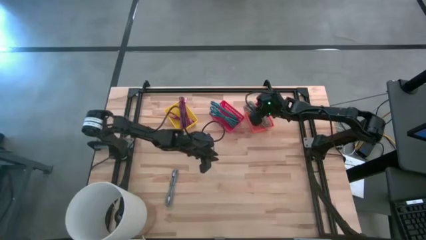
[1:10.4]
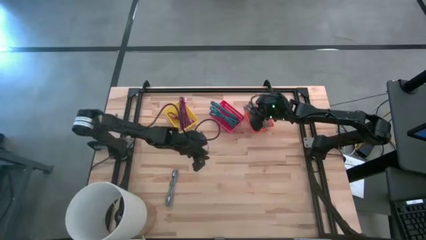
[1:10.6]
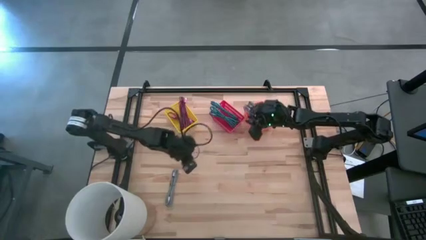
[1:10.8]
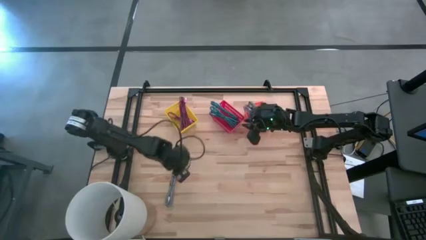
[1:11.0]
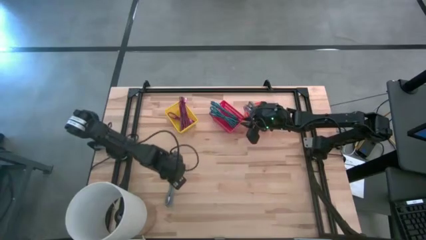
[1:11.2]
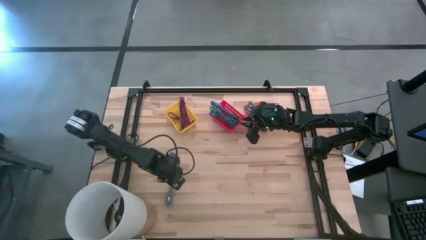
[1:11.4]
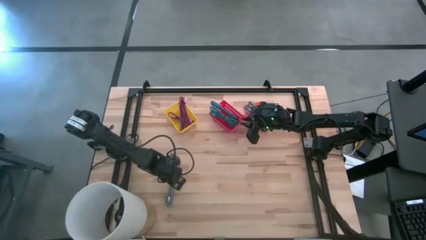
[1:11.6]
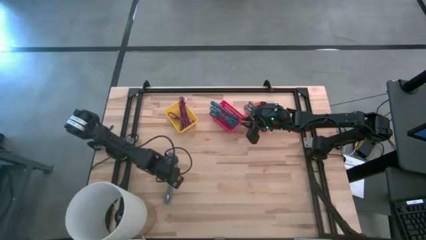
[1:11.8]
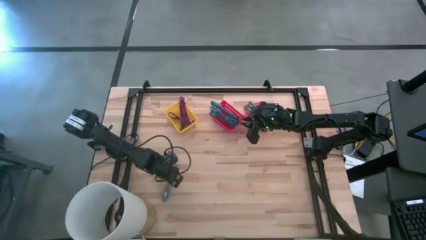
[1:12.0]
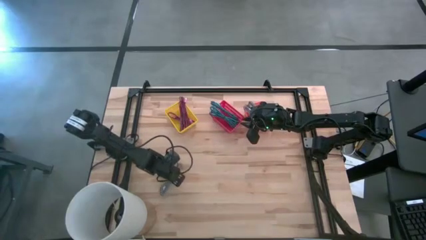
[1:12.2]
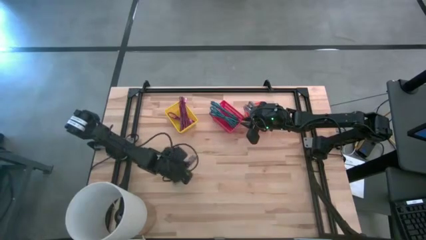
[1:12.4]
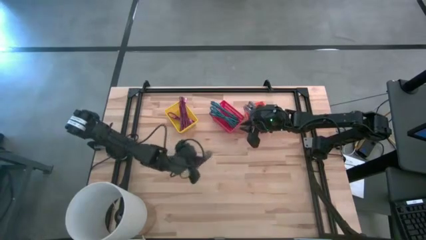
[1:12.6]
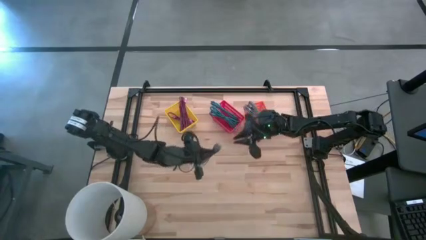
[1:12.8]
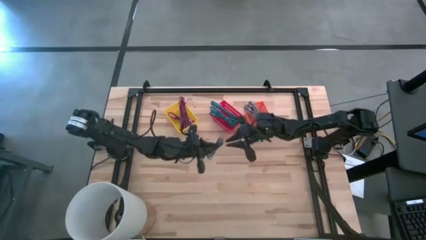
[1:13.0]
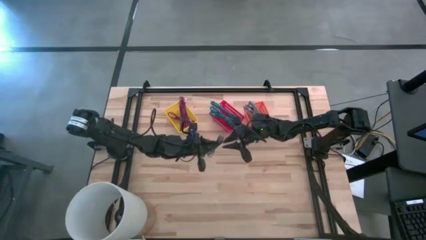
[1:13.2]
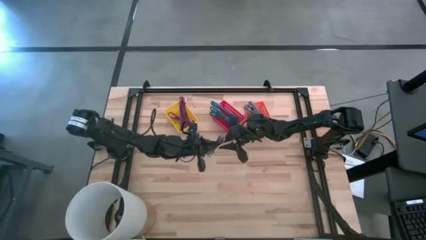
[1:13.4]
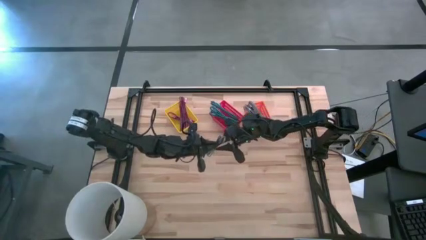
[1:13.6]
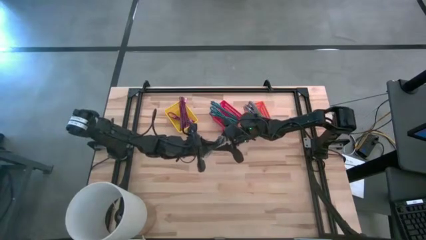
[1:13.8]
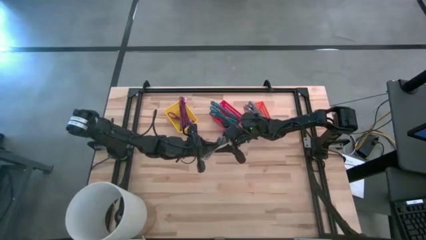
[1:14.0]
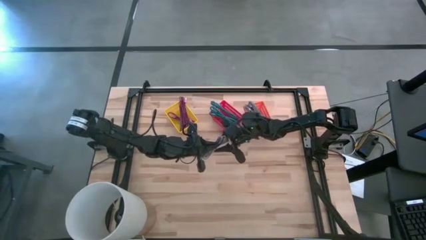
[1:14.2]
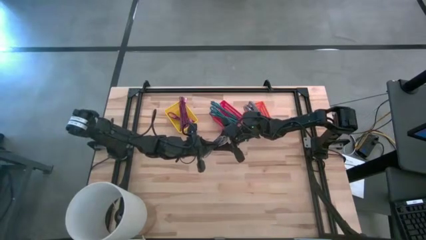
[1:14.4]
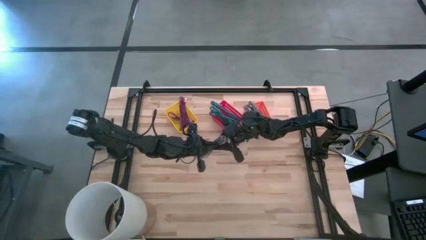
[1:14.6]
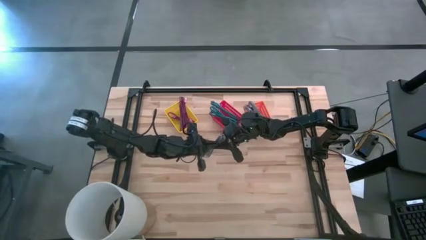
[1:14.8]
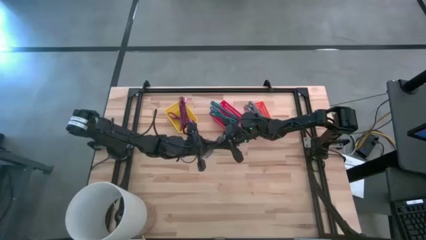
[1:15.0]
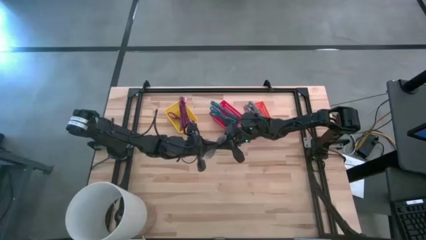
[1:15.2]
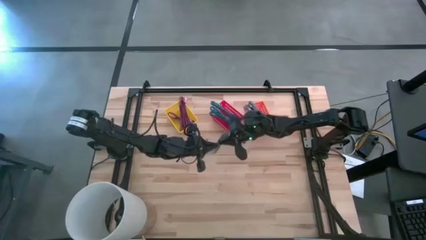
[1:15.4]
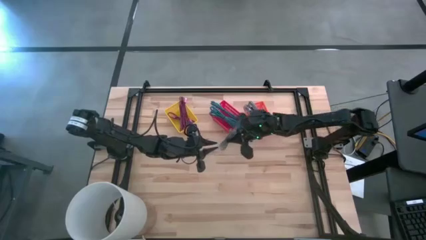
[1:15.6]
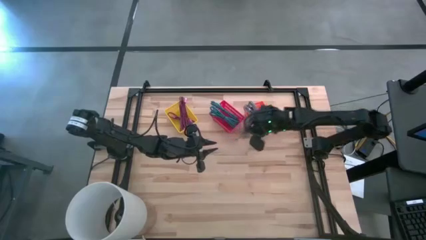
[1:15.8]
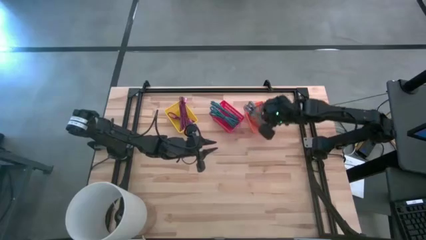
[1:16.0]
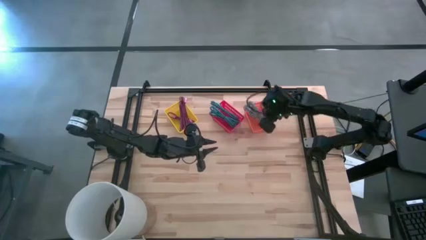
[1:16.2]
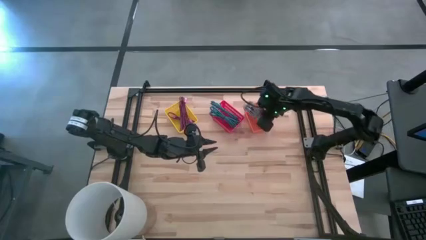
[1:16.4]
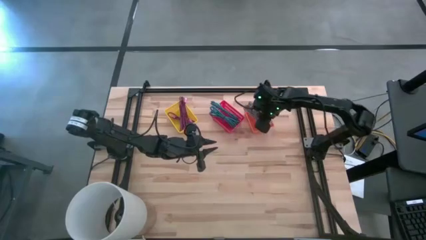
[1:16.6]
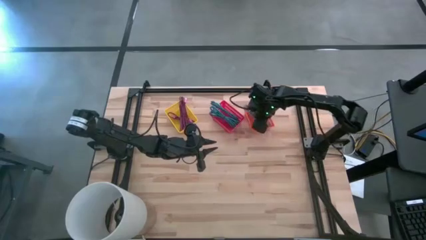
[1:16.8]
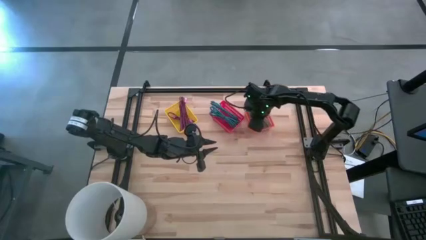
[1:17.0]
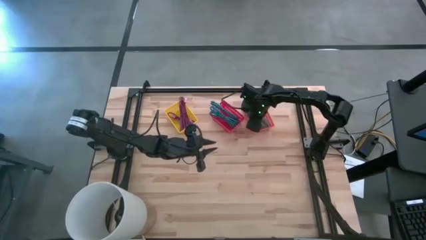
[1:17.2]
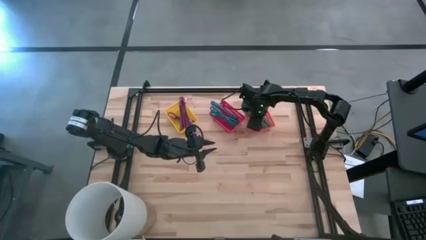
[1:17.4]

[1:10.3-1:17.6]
Task: Pick & Place USB Port
Put the black white USB cable into the orange bin

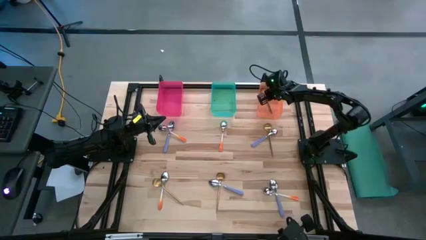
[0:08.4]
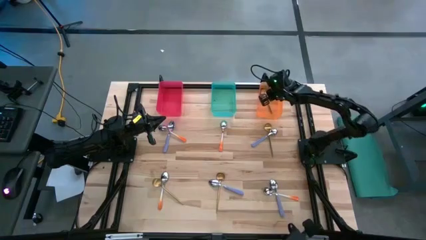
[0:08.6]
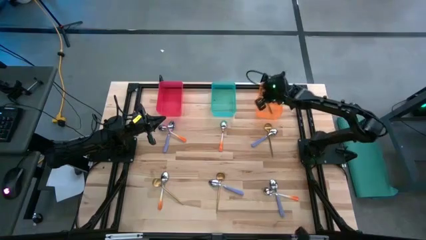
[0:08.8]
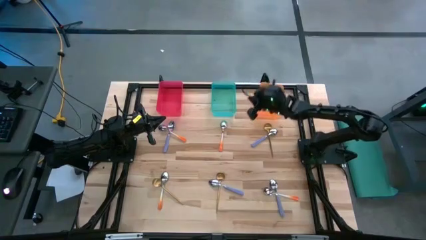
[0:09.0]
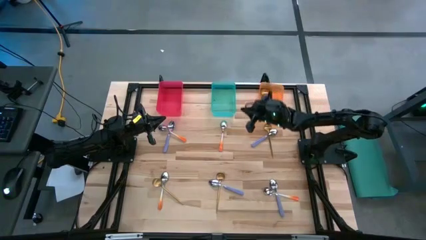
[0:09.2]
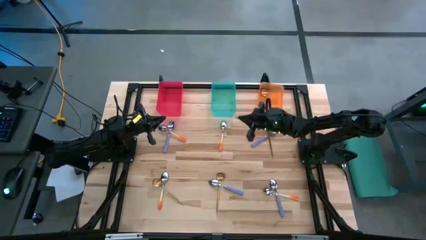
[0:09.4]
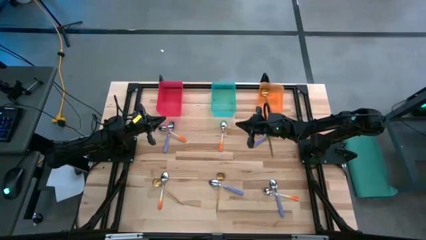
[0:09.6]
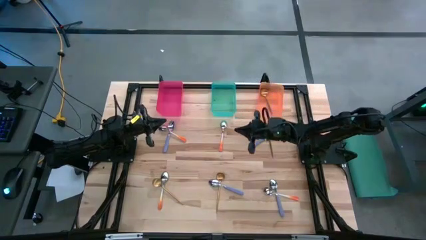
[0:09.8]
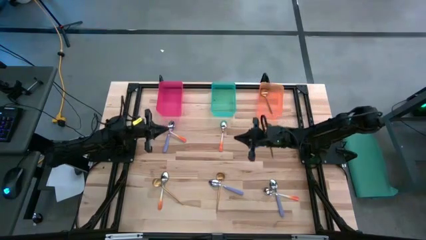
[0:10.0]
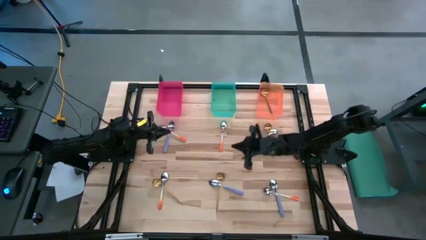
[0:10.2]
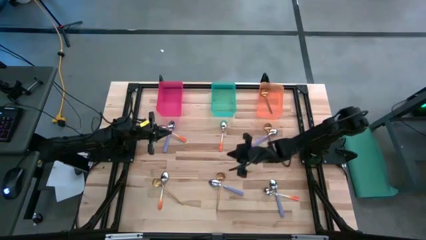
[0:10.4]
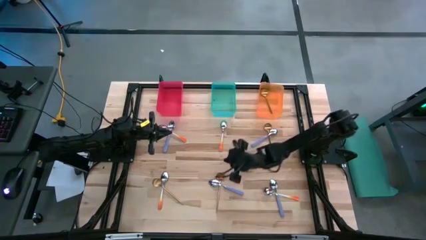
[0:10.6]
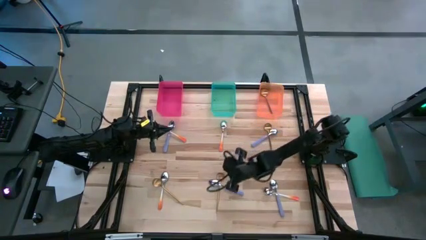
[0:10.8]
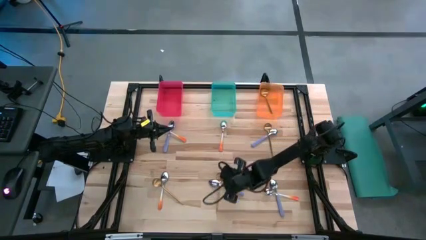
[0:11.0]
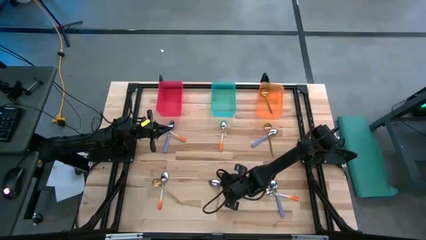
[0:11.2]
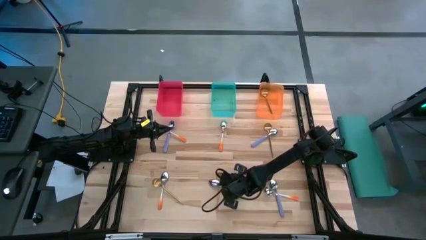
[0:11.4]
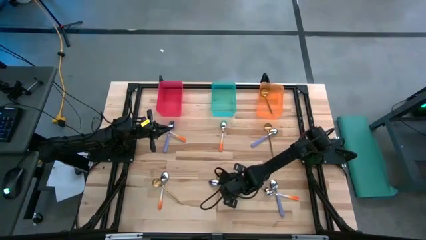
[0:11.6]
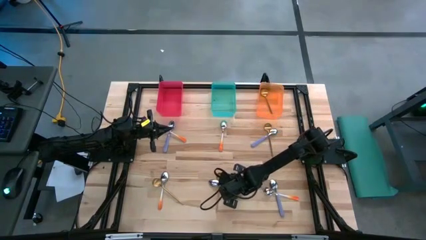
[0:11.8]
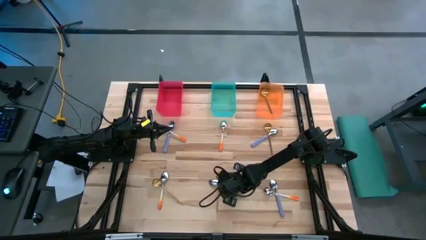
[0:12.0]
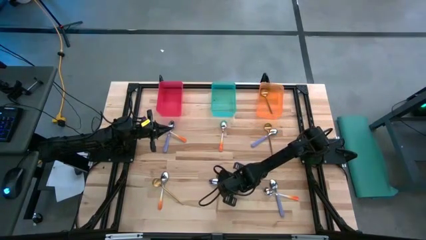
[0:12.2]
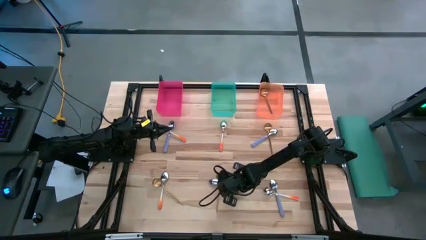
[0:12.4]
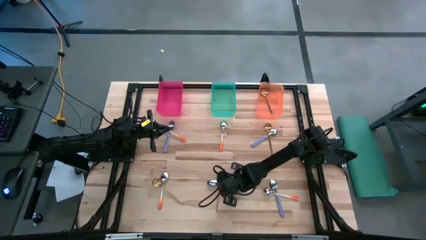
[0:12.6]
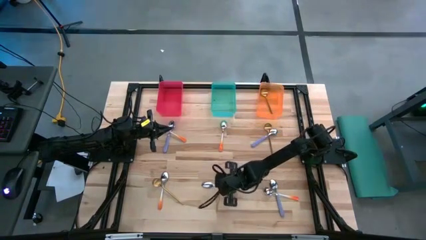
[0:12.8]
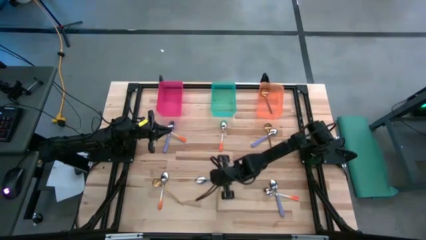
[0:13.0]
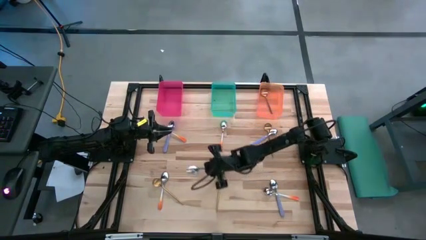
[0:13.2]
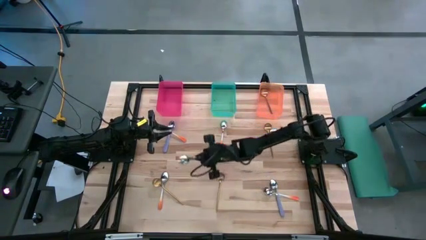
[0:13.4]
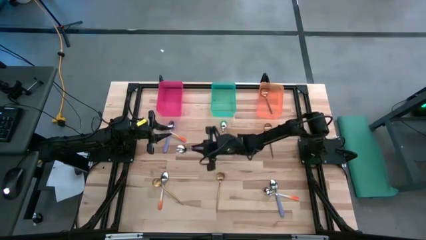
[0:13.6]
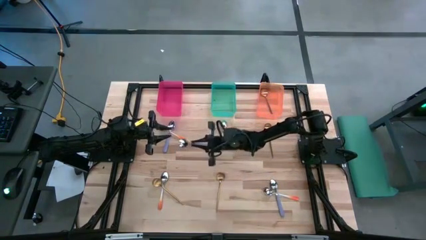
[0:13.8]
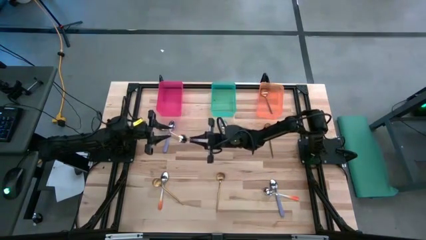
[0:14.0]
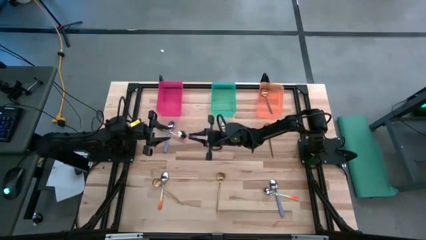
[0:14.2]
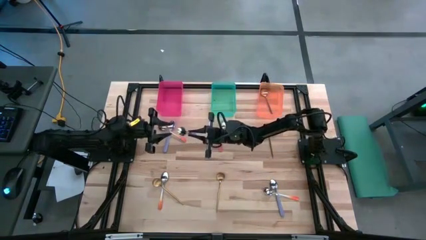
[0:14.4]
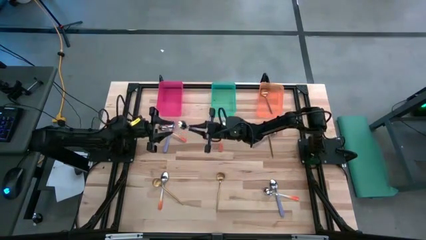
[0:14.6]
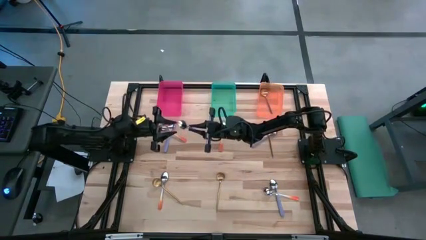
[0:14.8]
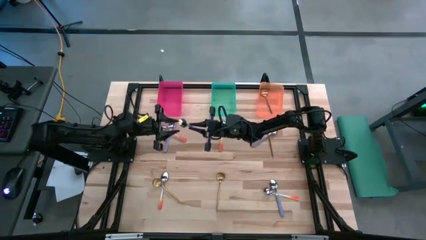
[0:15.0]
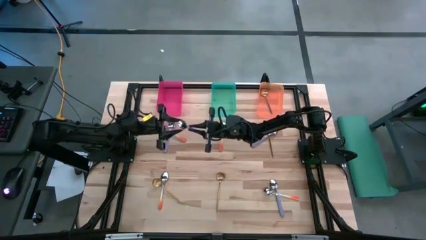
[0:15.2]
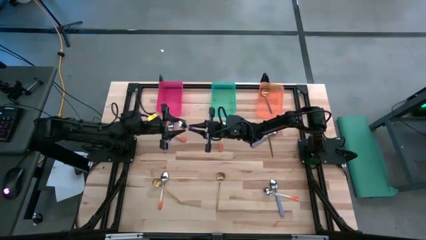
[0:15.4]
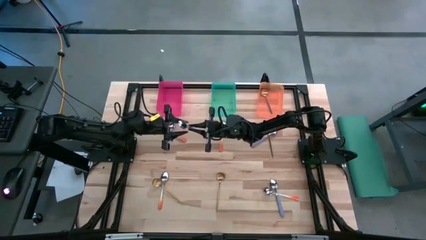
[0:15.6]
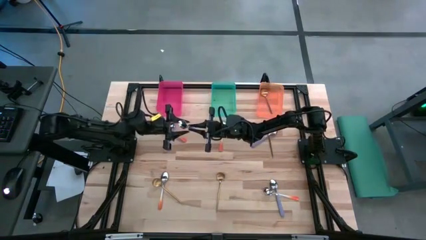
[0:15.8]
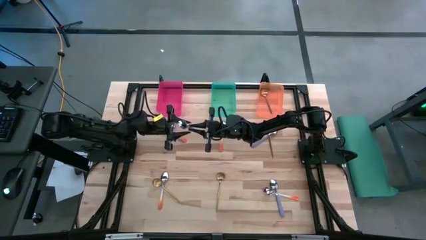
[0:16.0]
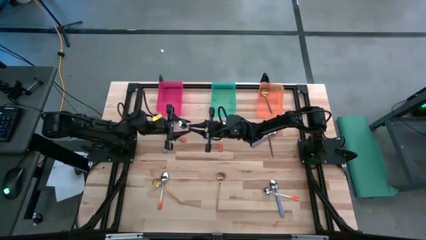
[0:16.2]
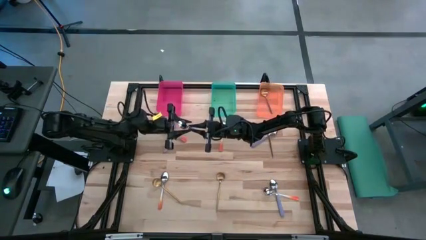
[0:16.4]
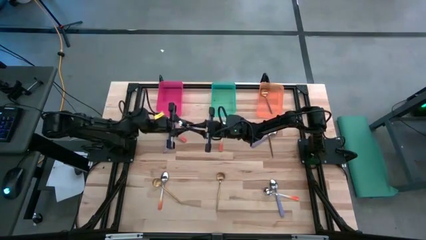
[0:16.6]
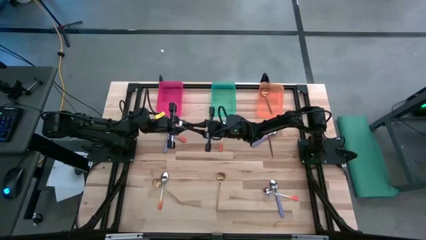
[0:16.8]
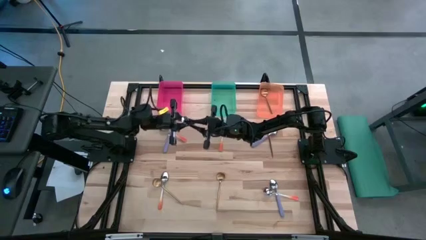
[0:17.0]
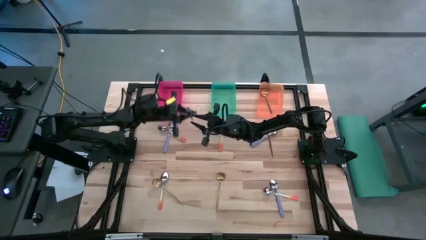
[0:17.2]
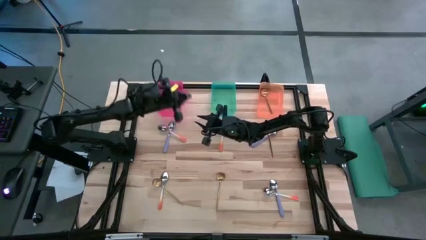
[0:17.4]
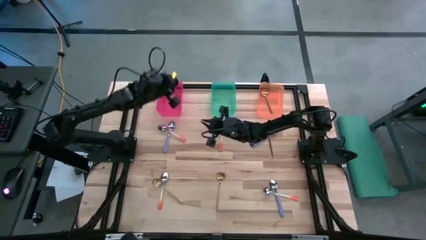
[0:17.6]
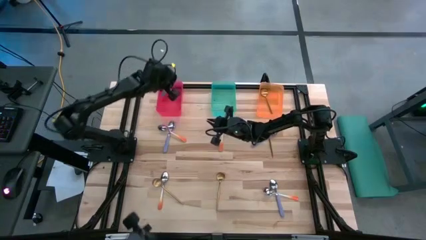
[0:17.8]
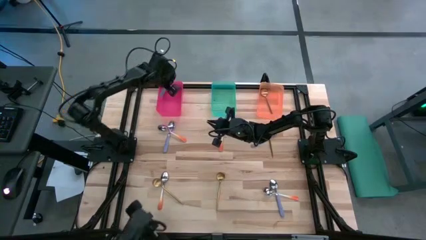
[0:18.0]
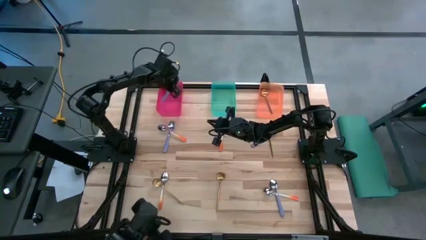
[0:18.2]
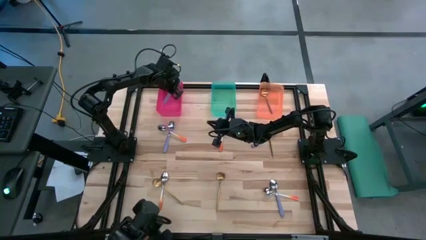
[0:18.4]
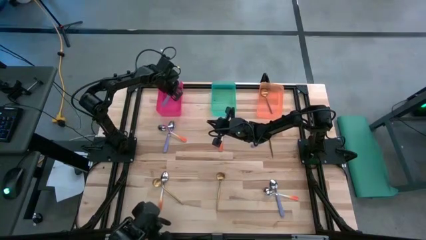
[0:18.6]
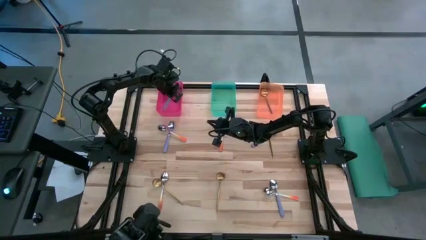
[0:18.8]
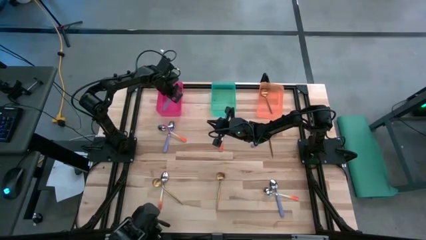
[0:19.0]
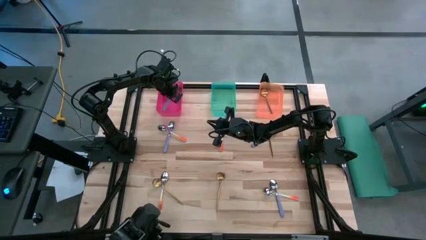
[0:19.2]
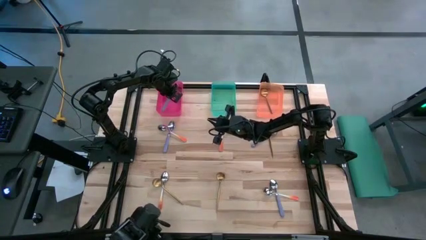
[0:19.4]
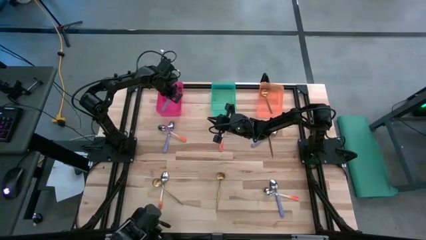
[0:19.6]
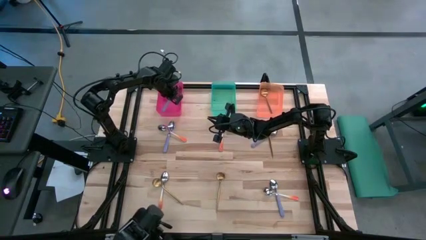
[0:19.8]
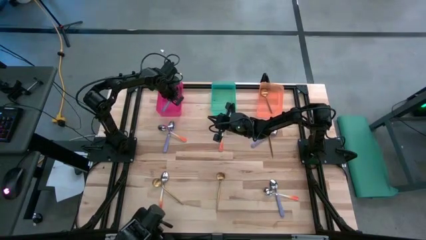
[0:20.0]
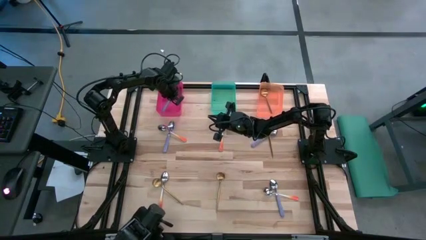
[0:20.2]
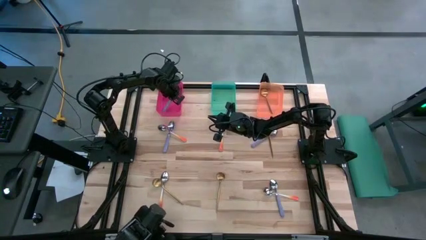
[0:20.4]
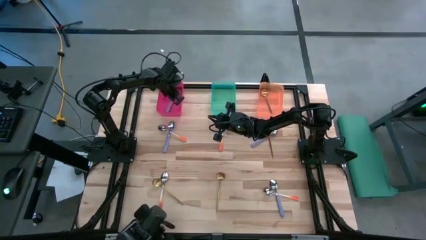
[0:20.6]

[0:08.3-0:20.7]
Task: Sort silverware by color (type)
Put the violet spoon into the red bin
